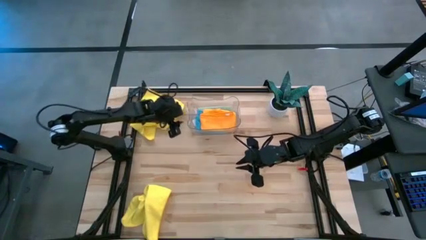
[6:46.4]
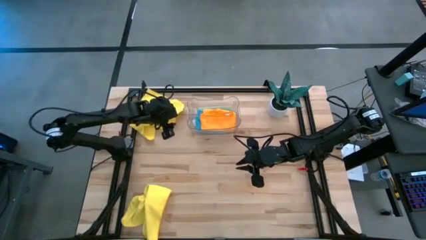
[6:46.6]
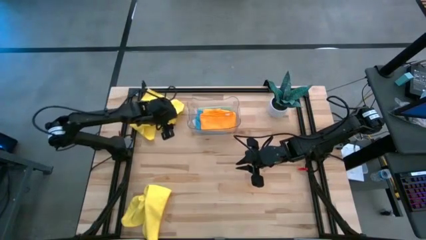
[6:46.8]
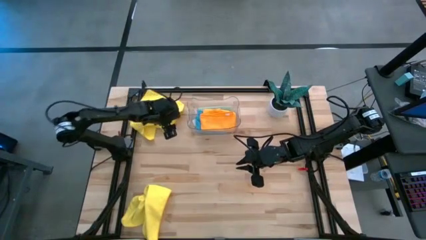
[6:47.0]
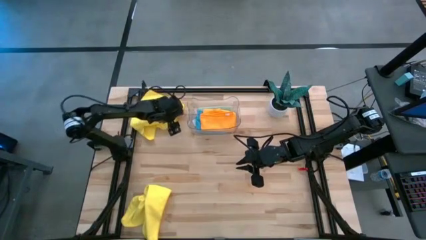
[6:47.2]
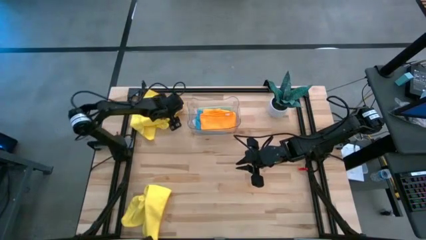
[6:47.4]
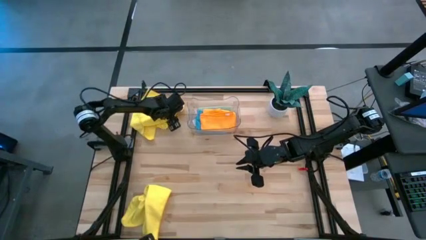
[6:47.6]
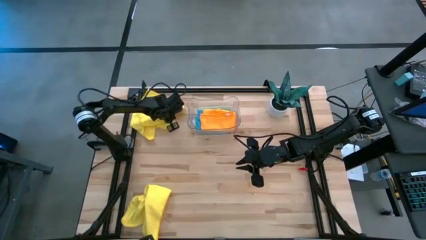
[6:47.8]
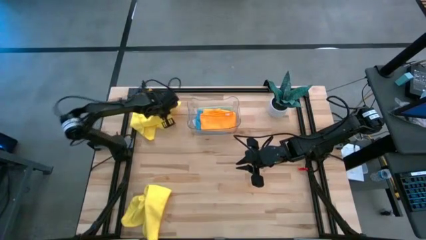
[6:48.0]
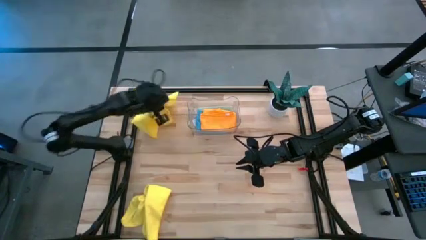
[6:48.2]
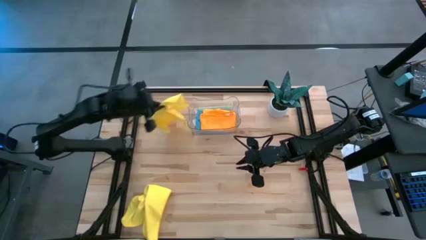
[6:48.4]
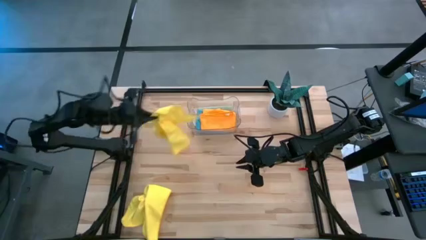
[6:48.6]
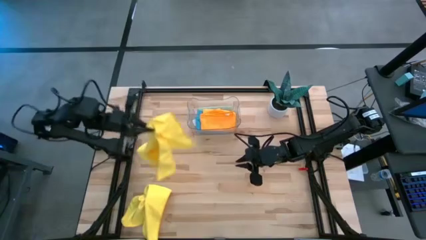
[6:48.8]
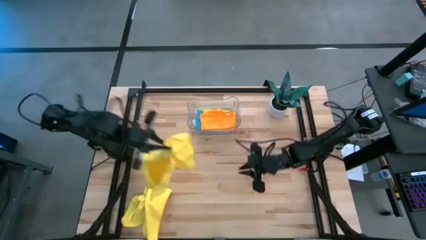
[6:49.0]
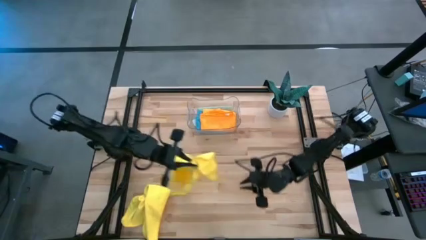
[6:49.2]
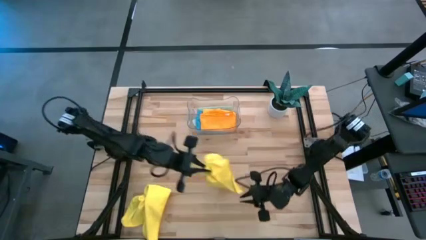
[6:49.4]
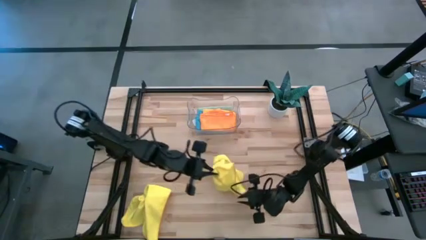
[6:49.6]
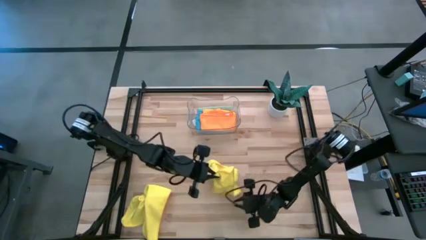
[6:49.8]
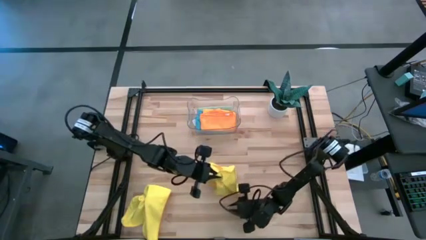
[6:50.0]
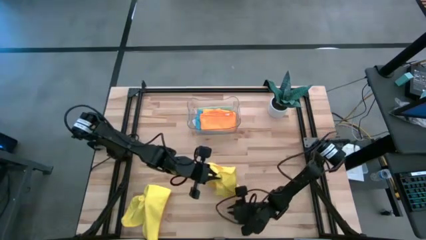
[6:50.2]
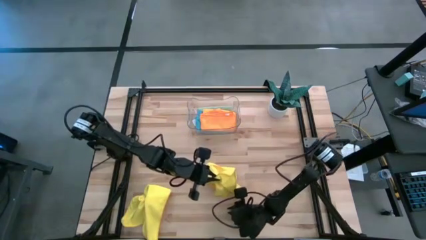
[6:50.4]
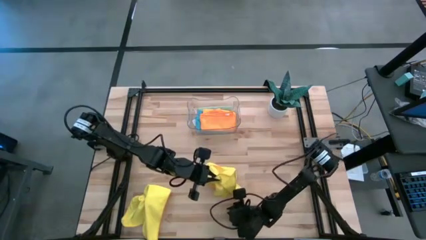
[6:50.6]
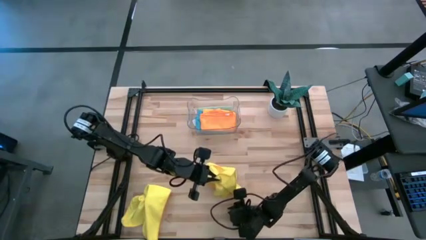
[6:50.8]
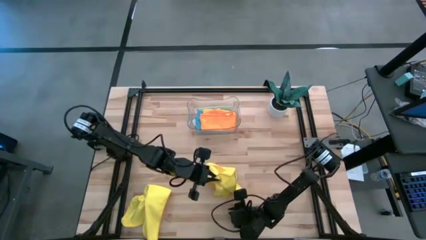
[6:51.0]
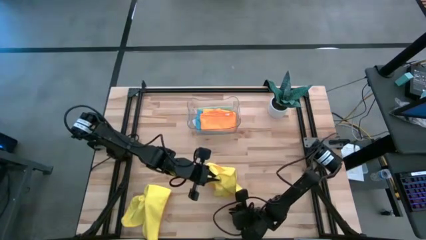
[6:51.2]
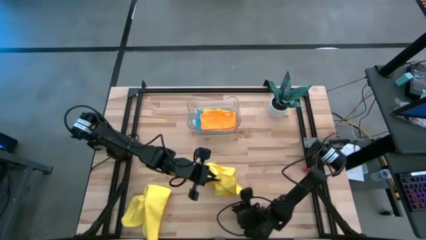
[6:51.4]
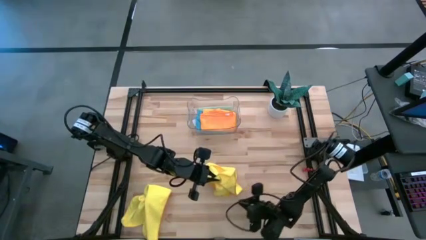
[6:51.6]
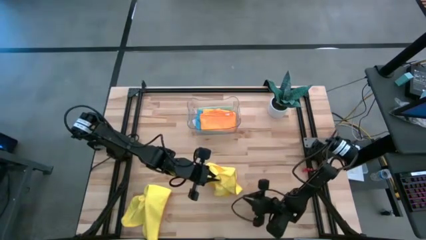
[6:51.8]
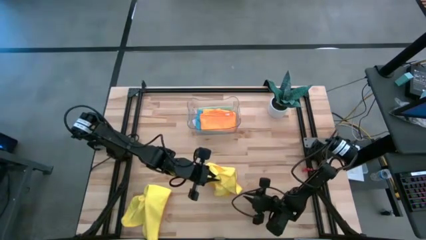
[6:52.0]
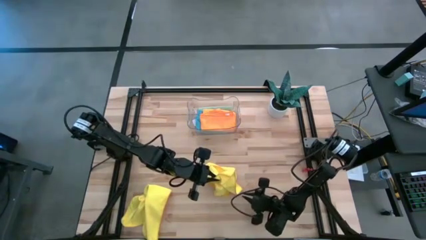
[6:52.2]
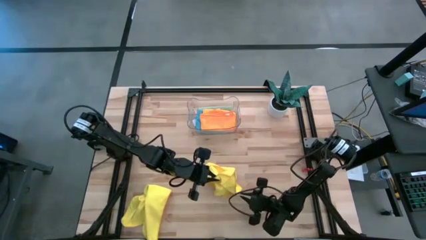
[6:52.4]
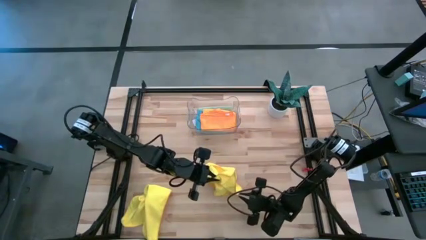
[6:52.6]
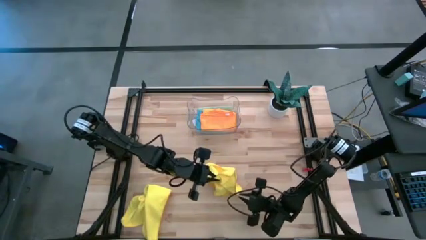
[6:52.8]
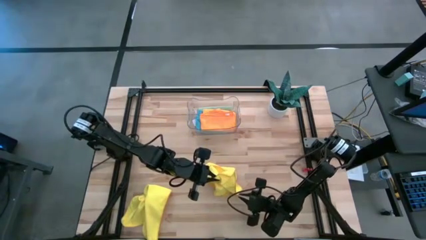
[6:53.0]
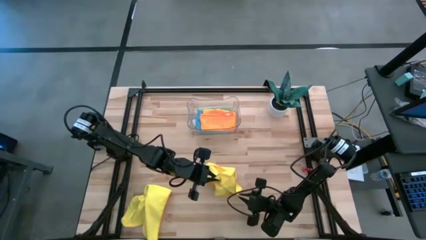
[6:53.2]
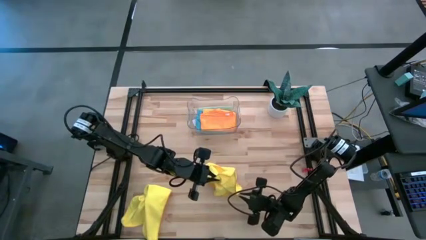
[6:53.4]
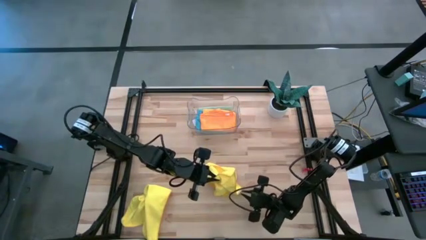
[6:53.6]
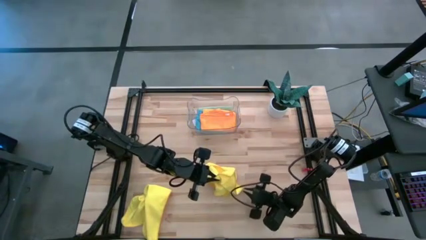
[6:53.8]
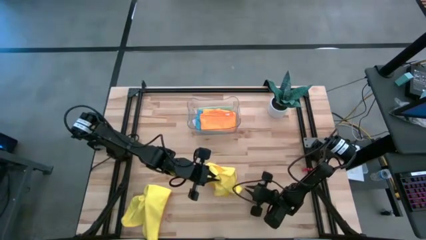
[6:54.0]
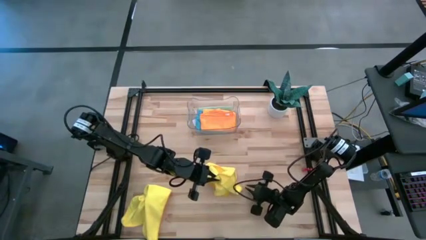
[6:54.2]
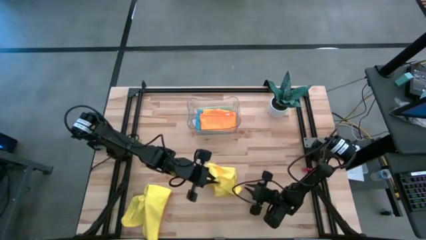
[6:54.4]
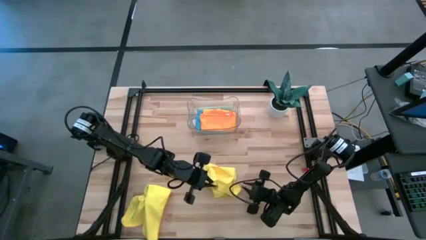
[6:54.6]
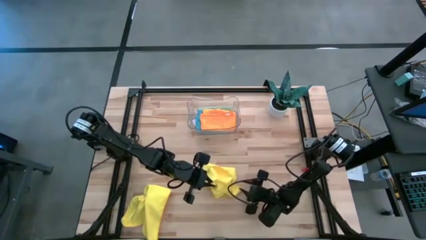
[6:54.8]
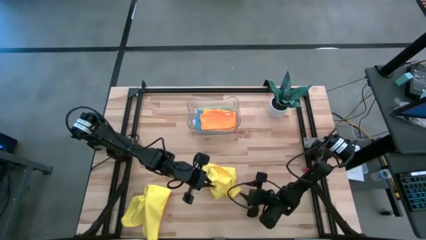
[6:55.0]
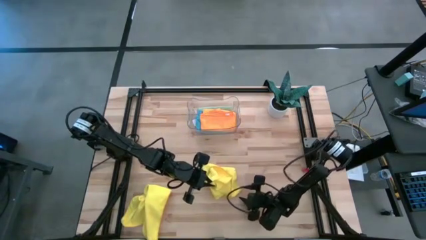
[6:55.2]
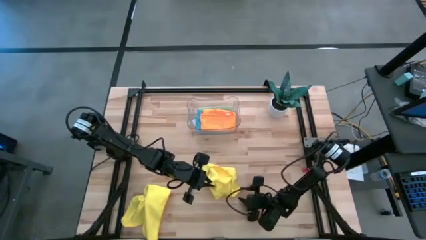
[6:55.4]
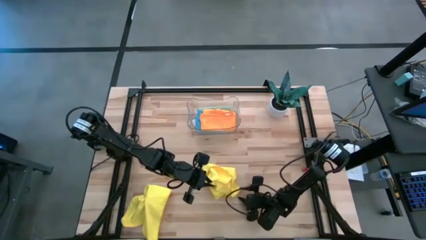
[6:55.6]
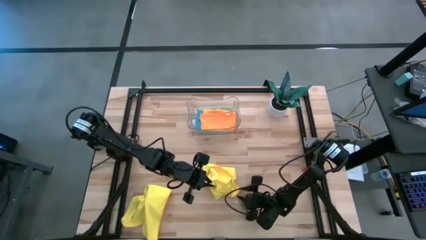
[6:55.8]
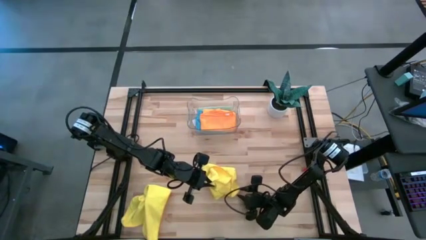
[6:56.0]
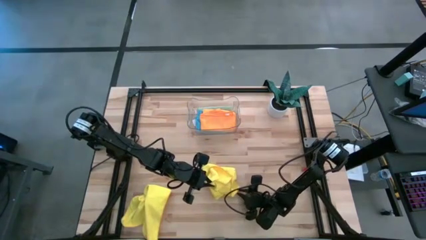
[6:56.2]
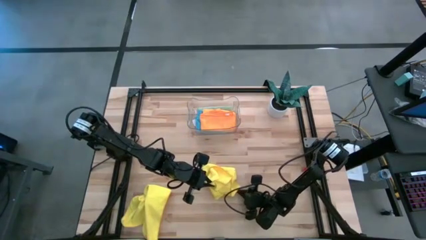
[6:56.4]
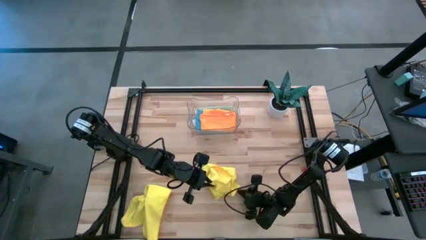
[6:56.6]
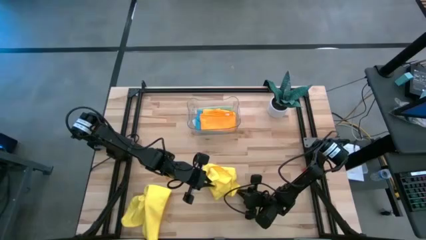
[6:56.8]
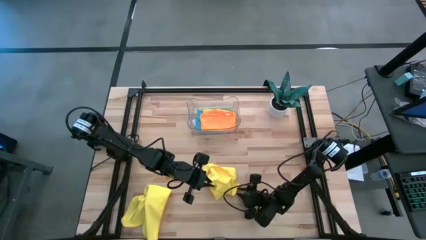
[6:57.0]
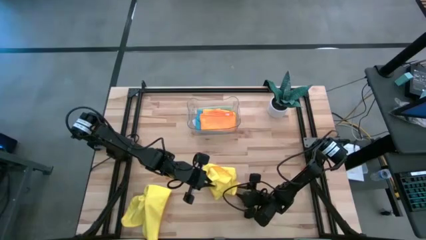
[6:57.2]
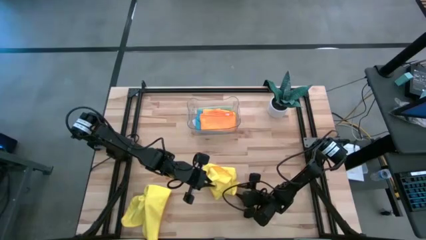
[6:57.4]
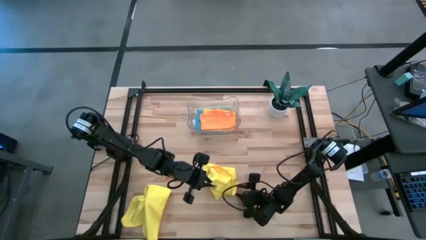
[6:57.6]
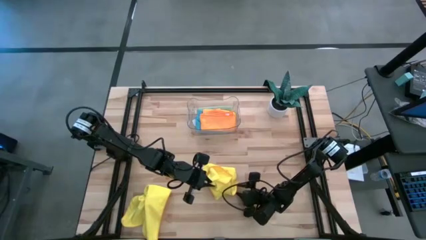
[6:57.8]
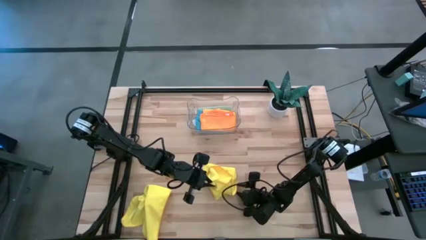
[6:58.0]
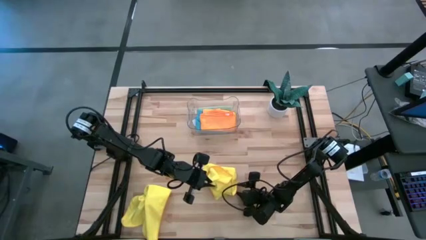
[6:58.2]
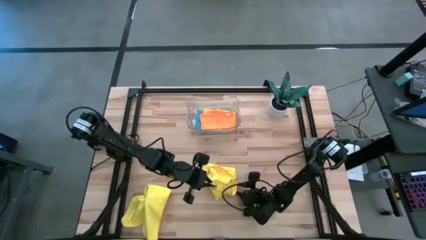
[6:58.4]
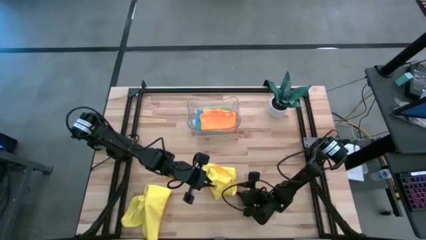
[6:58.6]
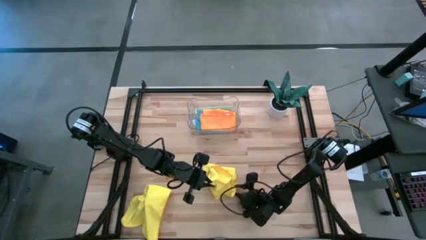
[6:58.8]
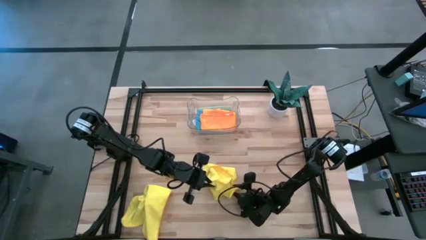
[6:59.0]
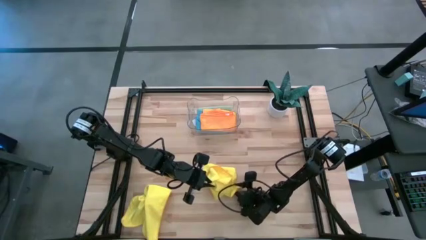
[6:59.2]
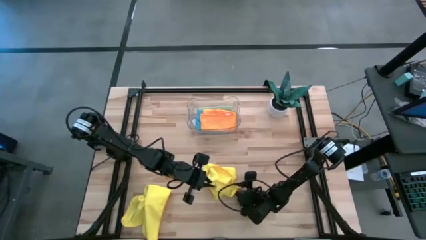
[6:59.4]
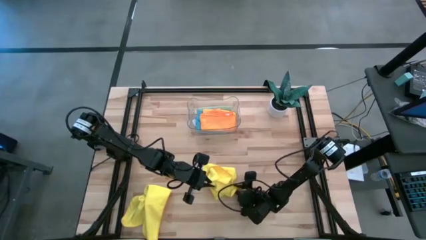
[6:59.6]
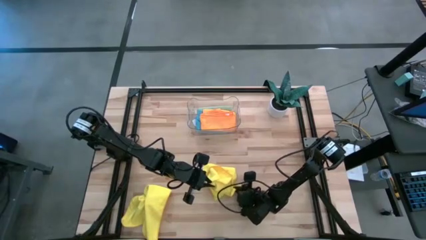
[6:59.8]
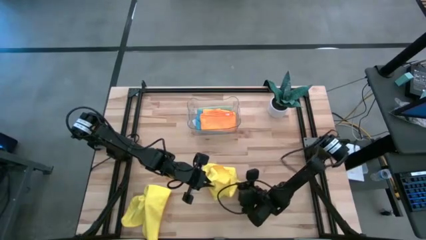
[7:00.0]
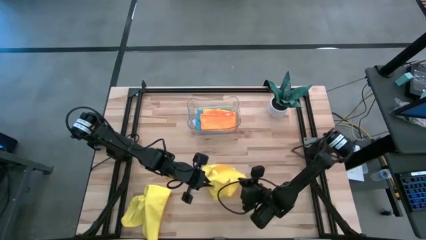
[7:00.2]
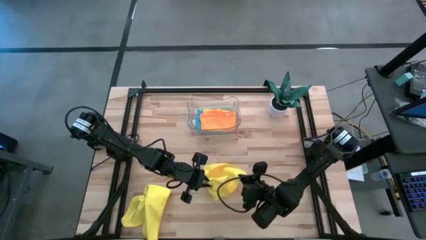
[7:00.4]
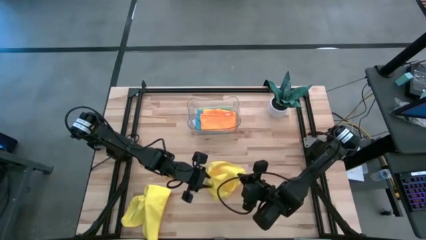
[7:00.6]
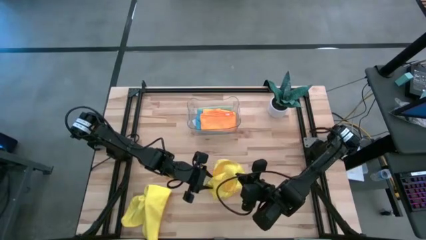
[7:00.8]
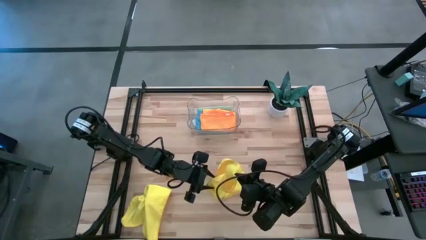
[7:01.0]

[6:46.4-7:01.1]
Task: Fold microfiber towels
Fold the top yellow towel

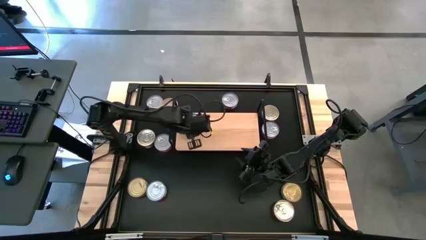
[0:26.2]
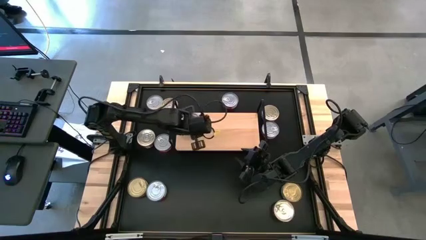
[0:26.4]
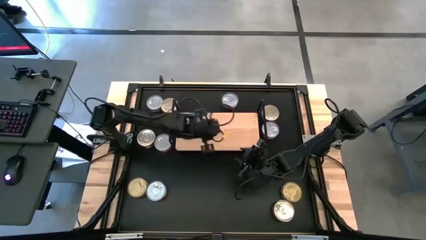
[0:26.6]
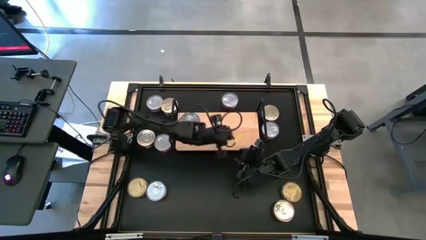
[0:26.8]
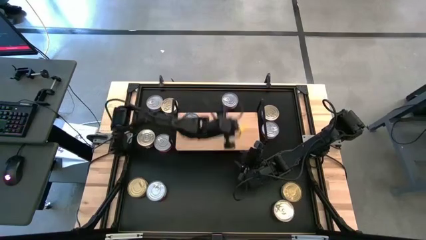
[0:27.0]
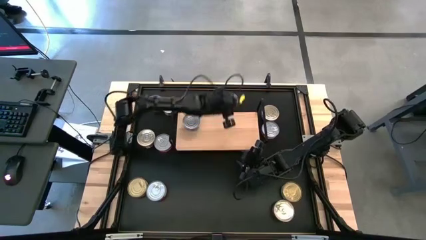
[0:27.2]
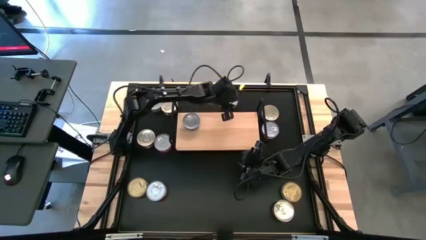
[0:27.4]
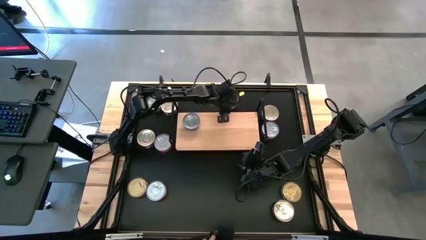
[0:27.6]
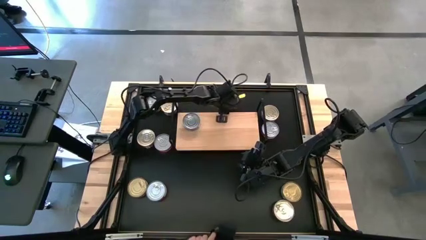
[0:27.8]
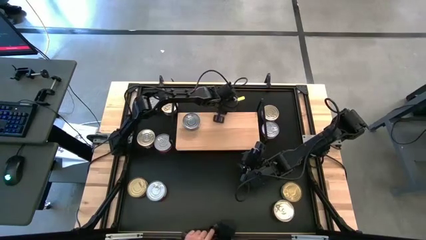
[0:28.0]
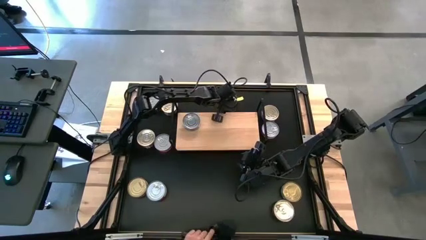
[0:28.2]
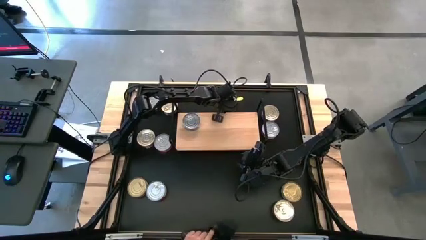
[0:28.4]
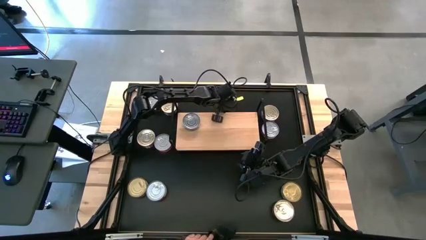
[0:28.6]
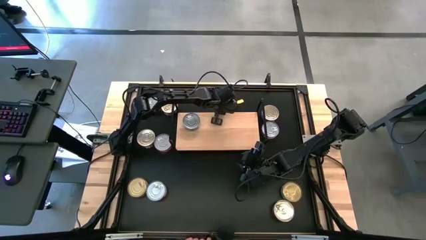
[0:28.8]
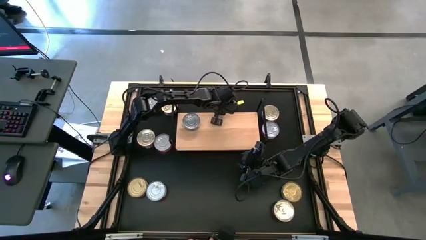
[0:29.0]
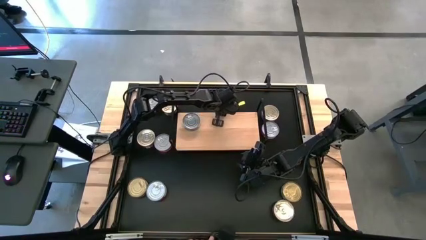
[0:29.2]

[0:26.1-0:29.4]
Task: Stack canned seafood by type on shelf
Put the red tuna can on the shelf
